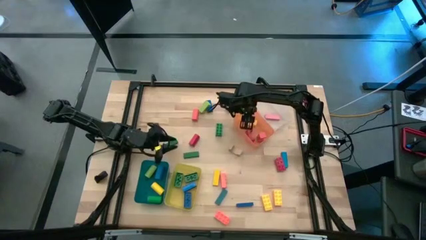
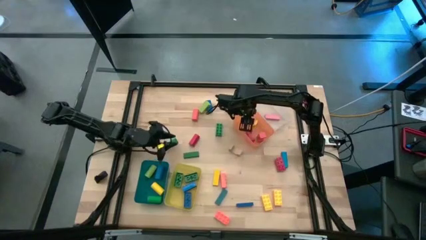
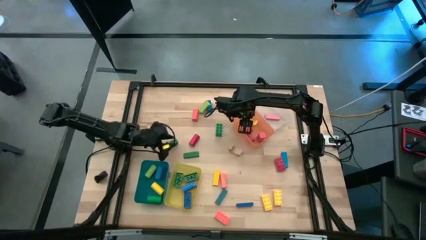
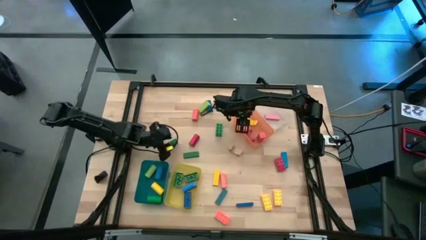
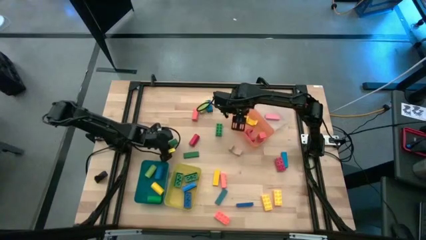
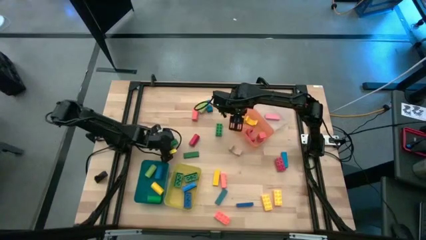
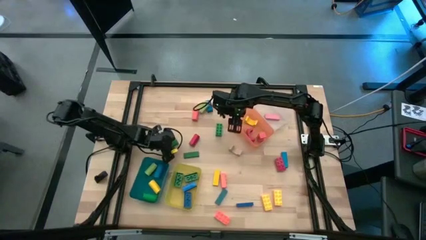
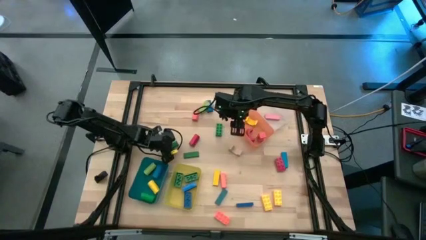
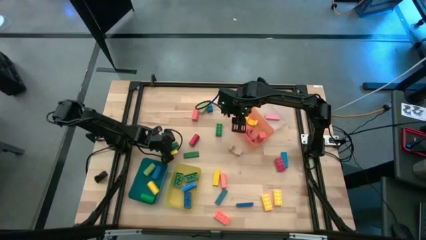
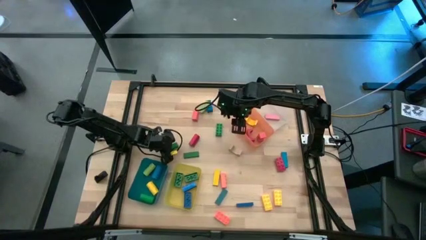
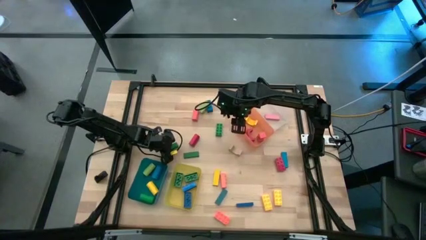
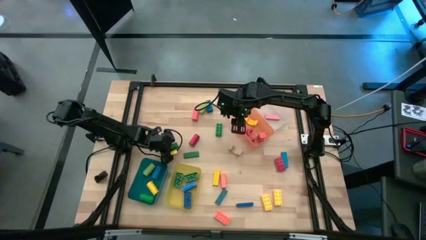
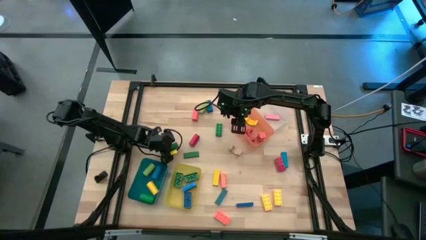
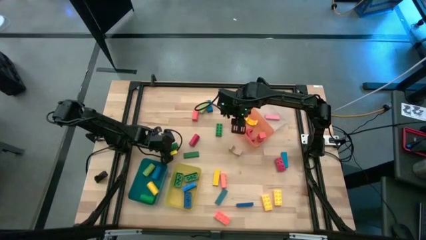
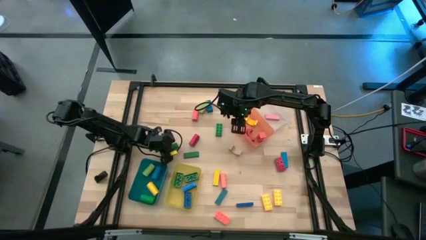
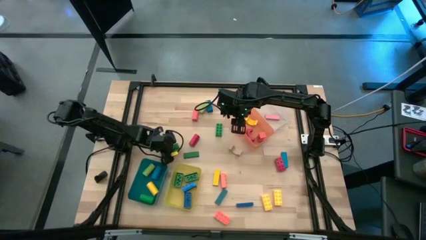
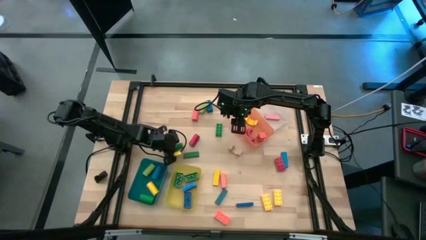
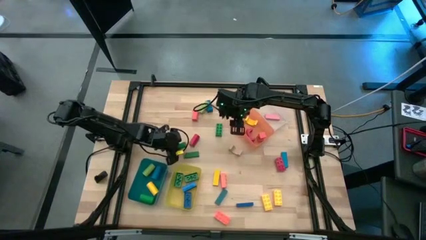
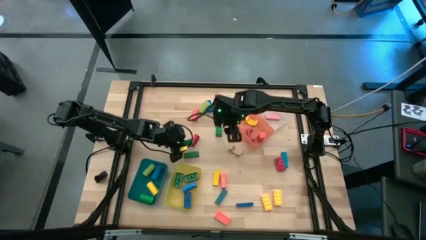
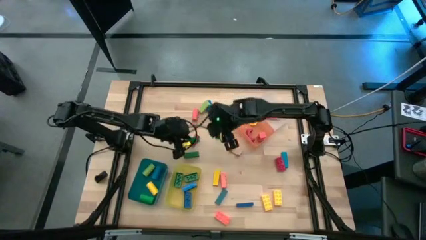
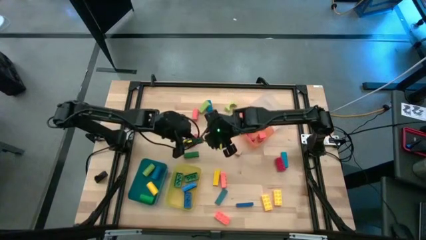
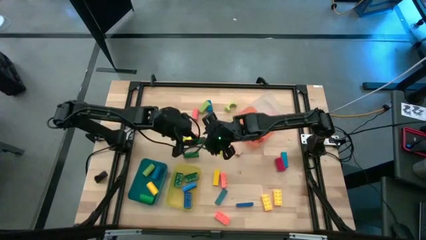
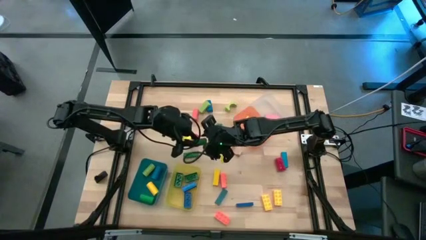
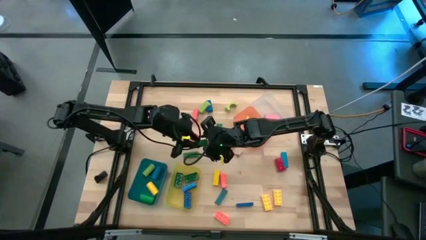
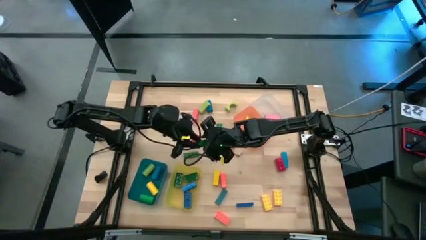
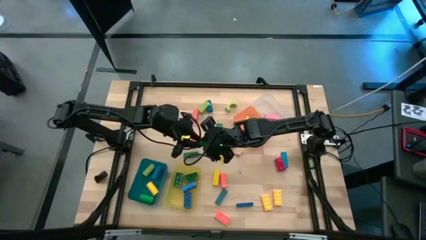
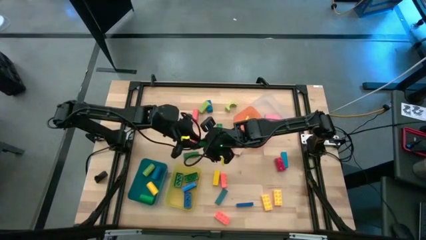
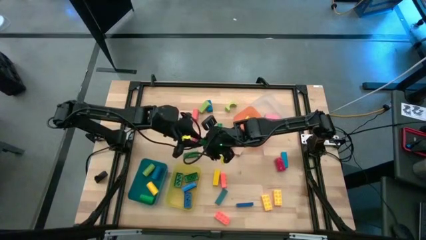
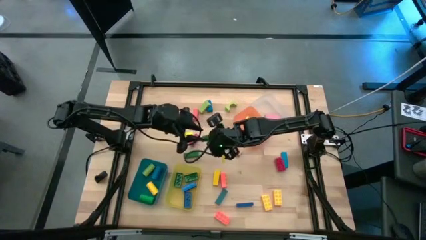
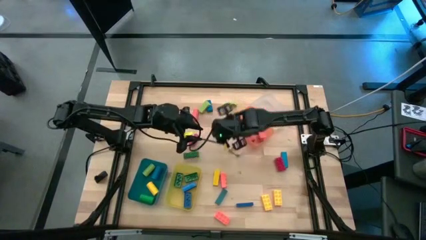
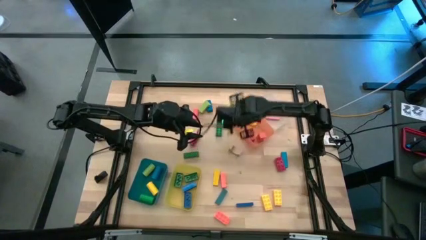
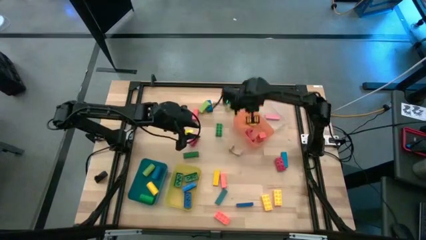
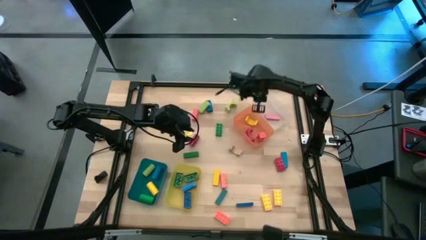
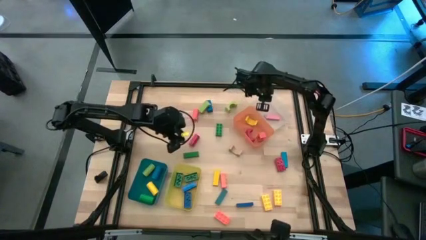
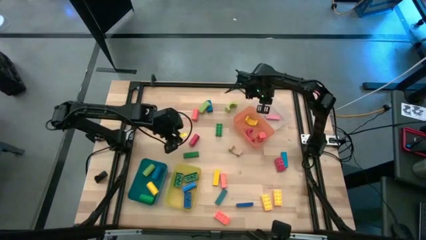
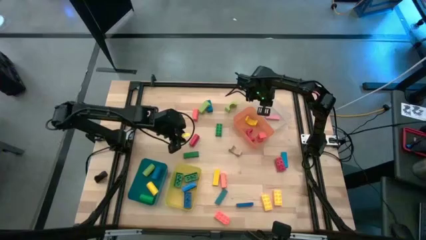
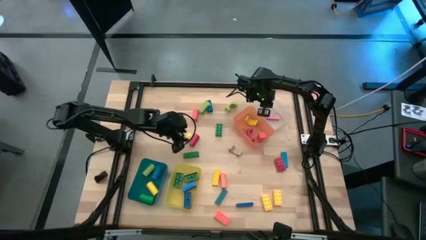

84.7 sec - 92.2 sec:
Task: Sort blocks by size
Put the green rectangle block into the transparent bin

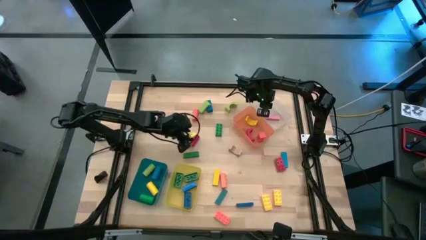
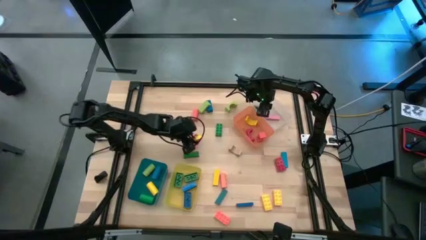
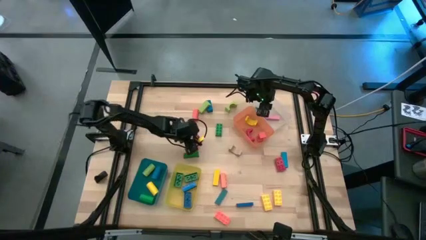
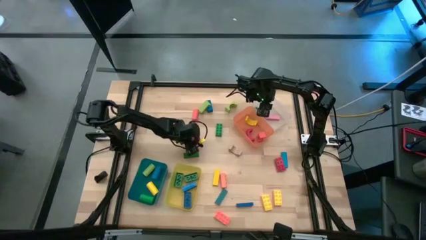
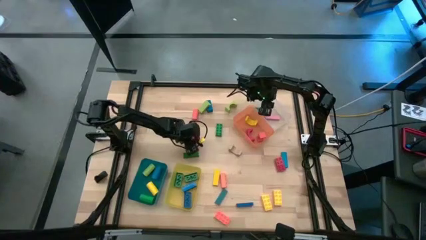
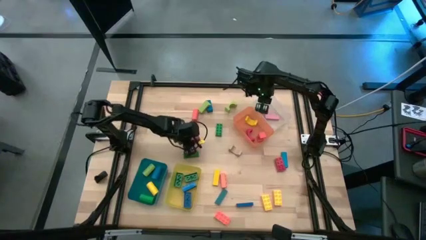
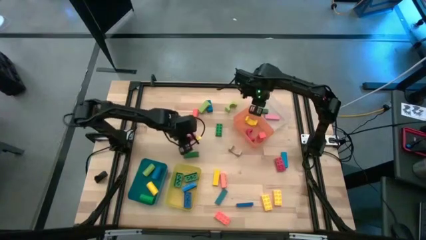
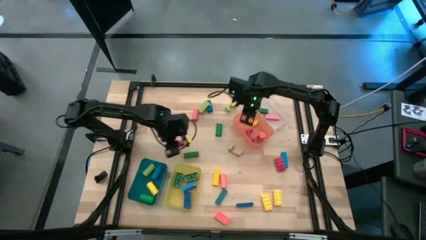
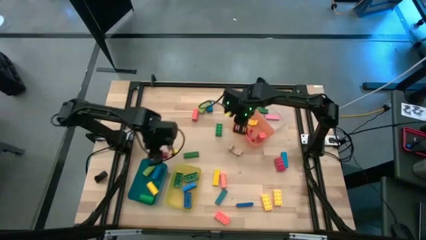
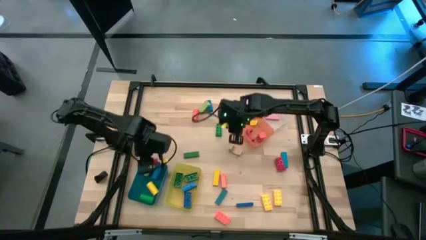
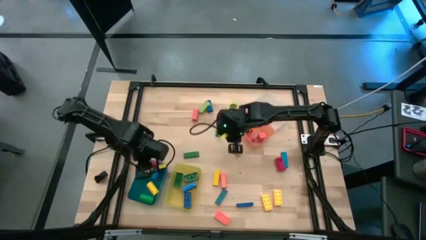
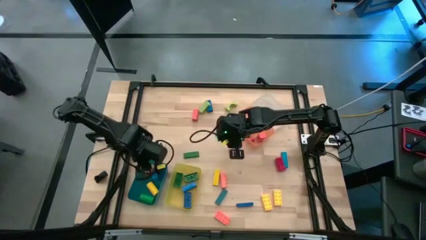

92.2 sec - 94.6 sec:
Put the red cylinder block into the blue bin

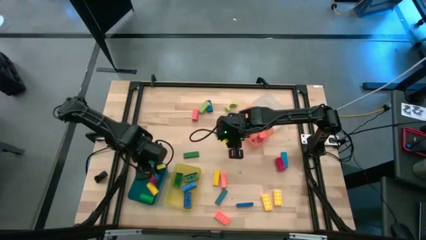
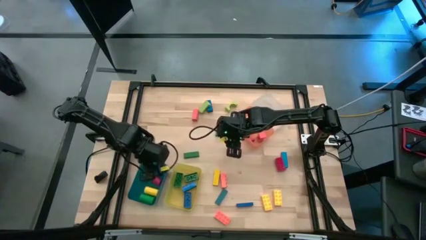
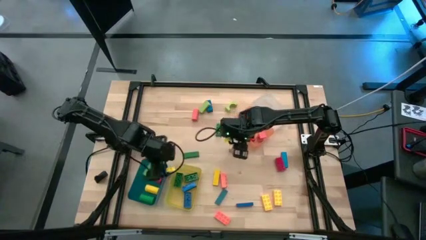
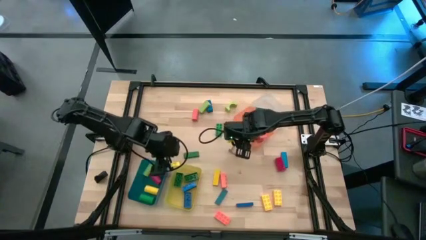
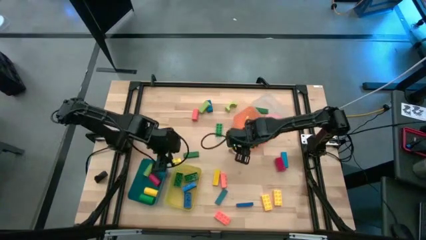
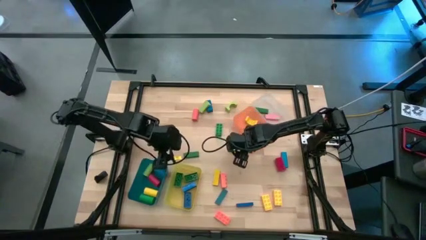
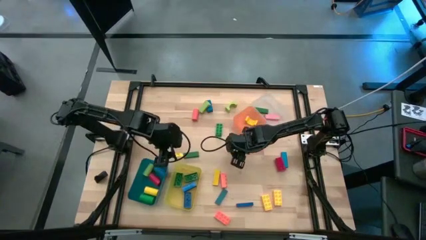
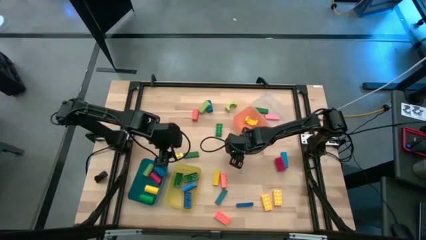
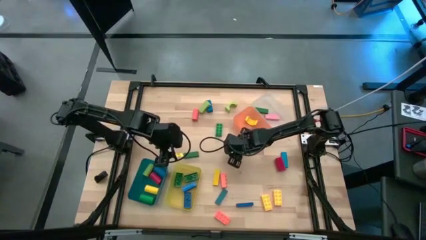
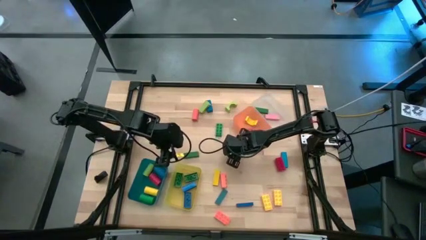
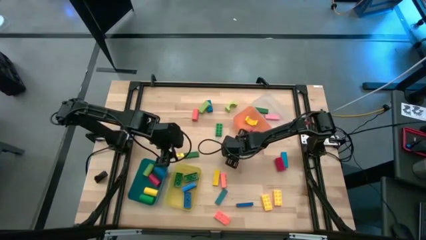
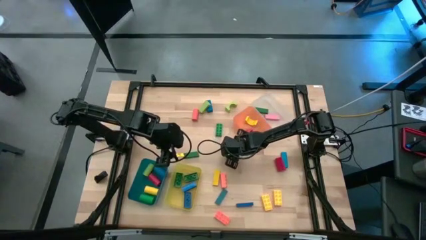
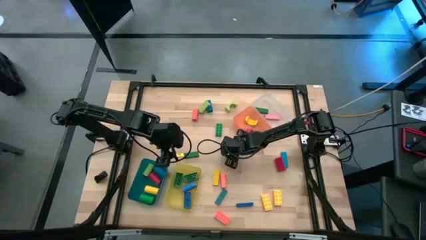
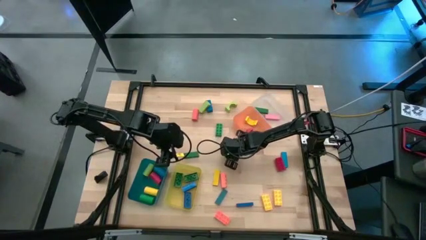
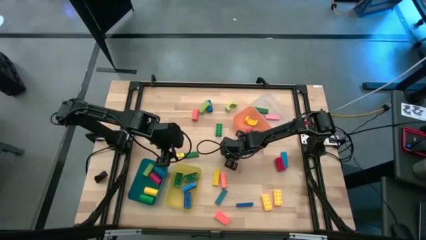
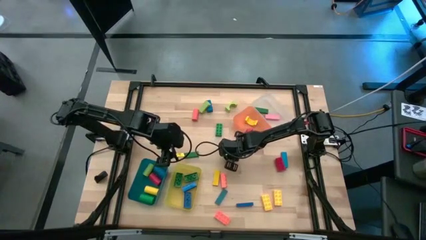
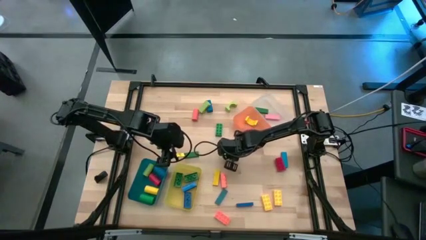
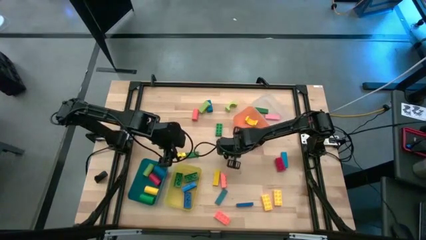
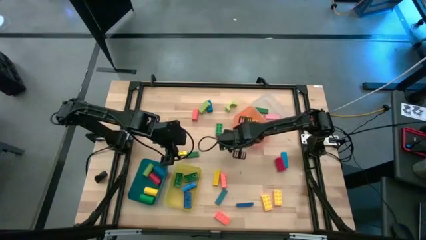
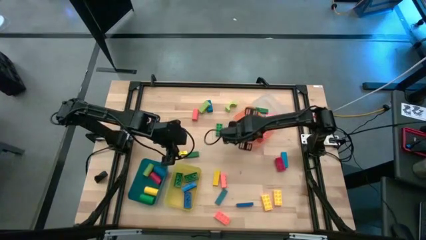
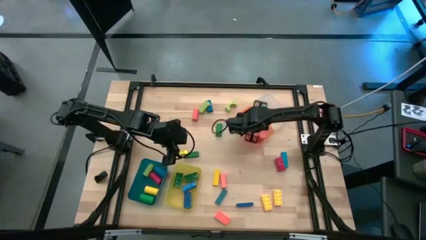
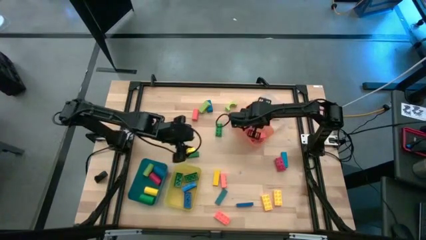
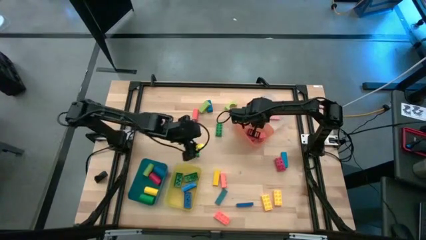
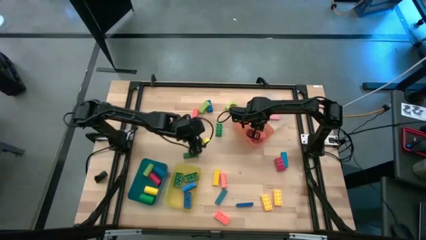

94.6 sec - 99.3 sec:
Put the brown arch block into the orange bin

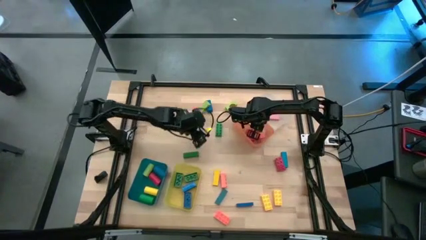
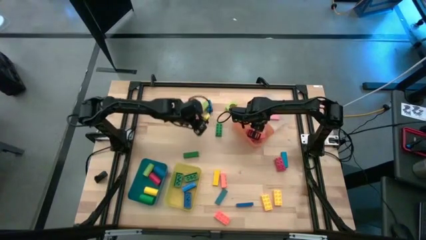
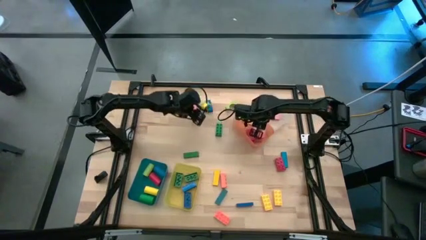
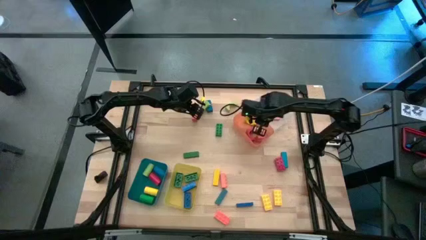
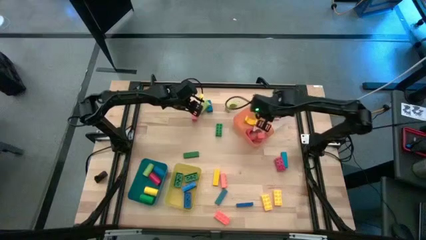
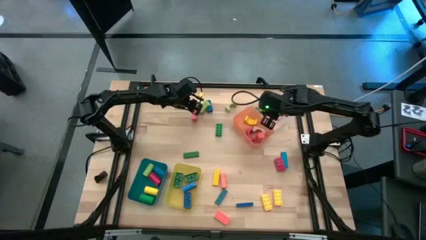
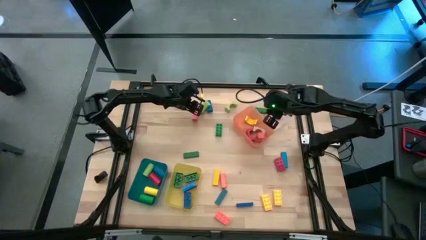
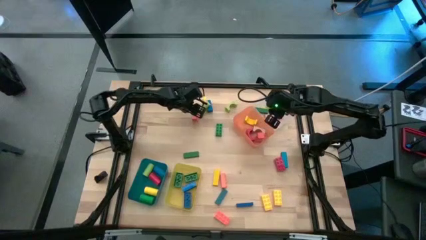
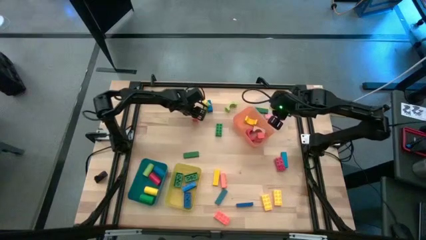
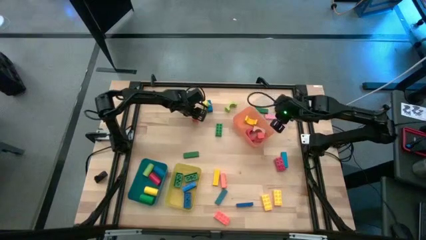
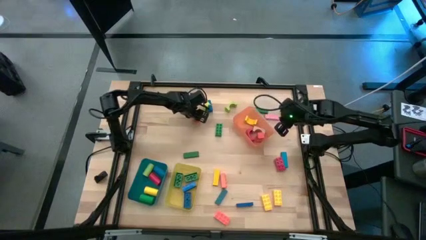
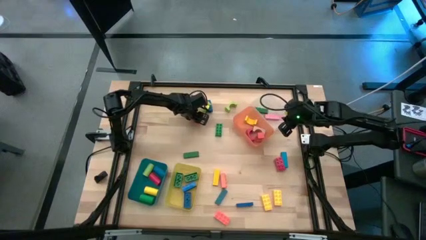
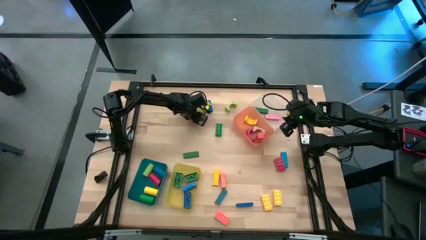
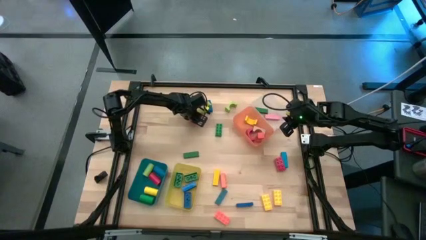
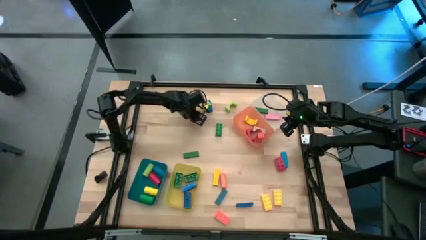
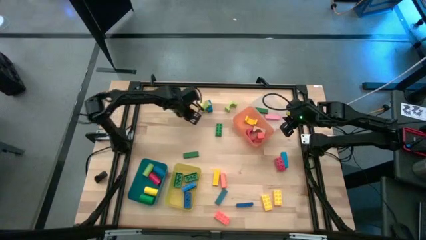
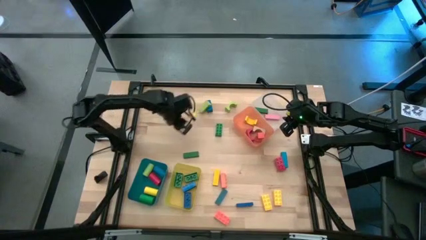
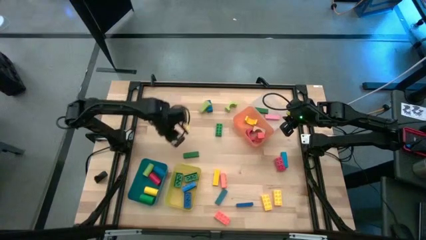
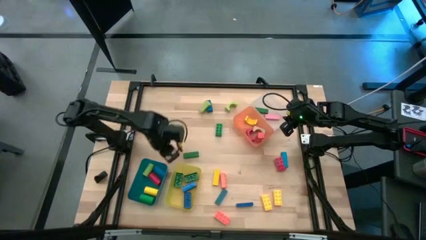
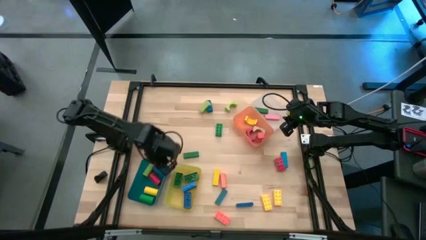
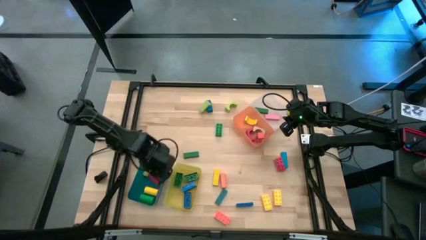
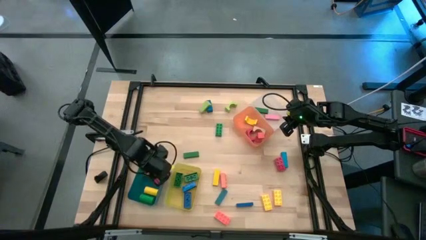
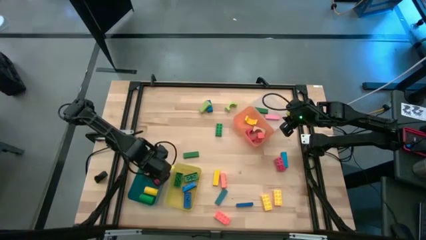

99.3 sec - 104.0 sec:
Put the orange cylinder block into the blue bin
